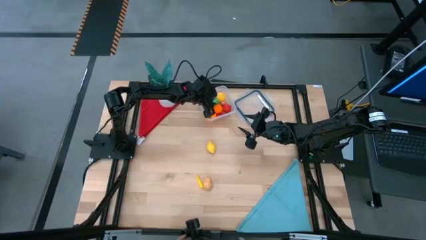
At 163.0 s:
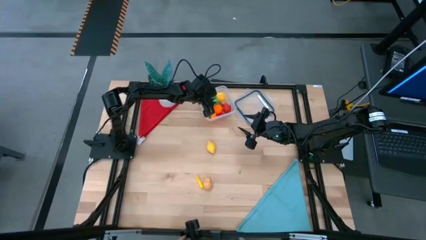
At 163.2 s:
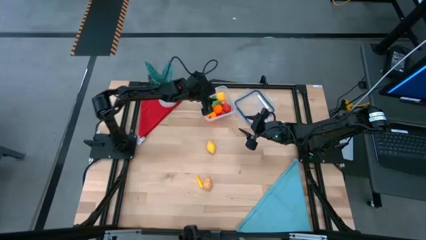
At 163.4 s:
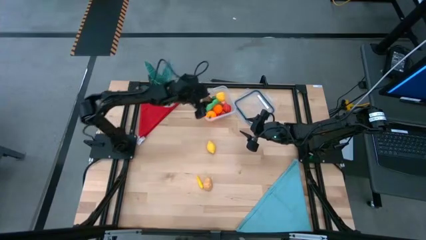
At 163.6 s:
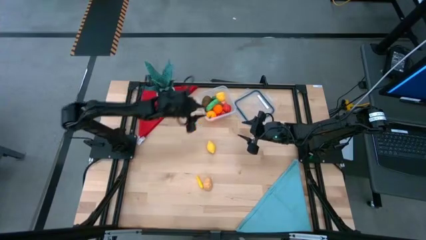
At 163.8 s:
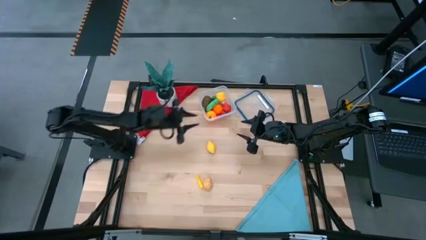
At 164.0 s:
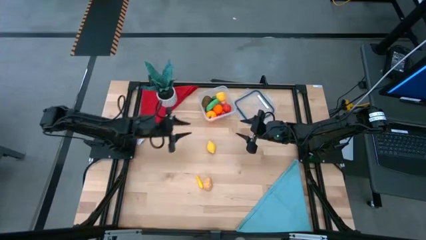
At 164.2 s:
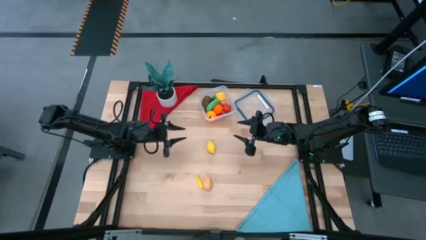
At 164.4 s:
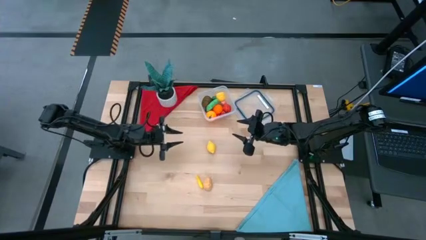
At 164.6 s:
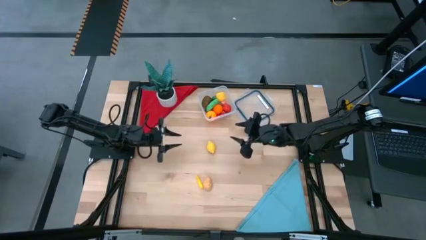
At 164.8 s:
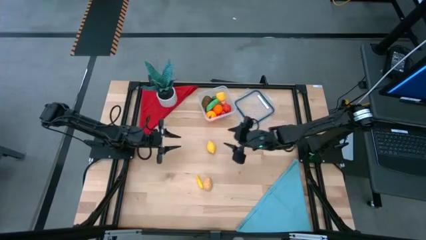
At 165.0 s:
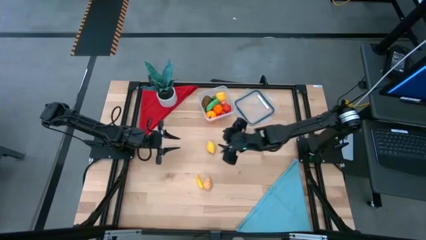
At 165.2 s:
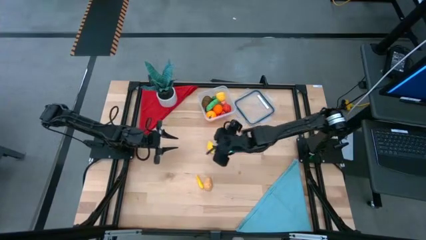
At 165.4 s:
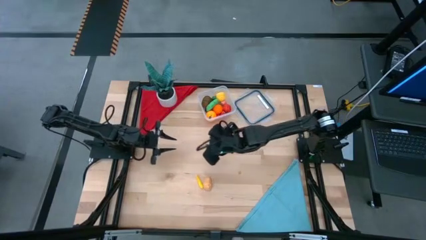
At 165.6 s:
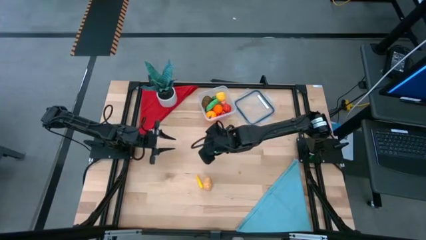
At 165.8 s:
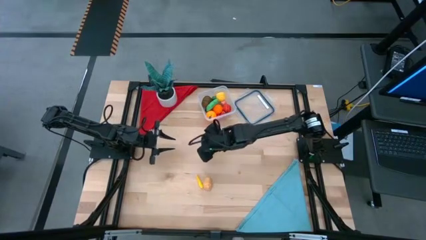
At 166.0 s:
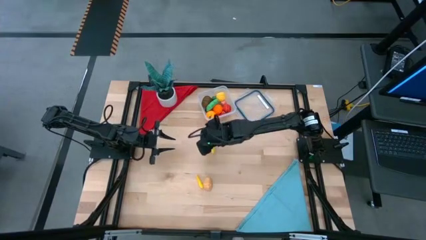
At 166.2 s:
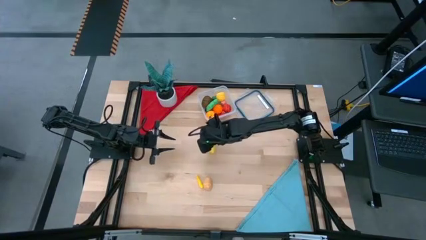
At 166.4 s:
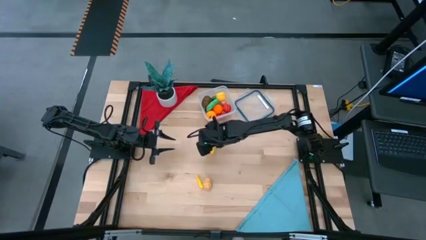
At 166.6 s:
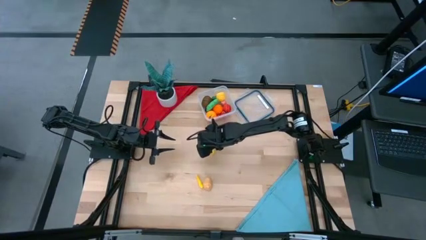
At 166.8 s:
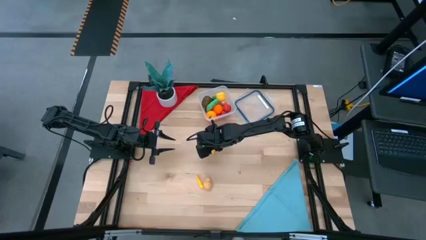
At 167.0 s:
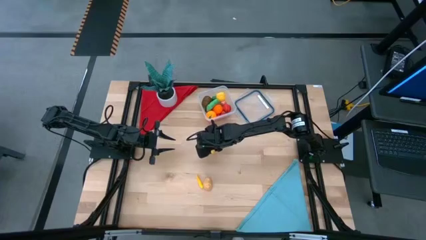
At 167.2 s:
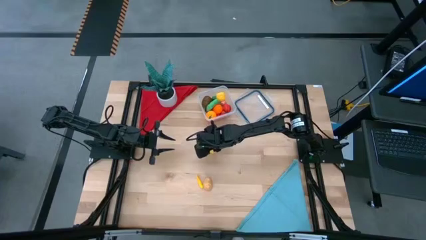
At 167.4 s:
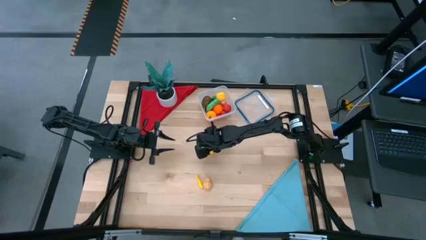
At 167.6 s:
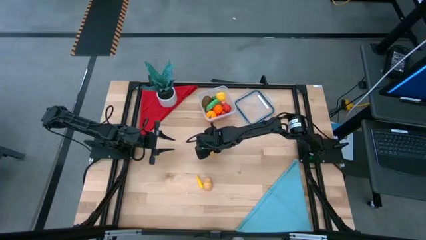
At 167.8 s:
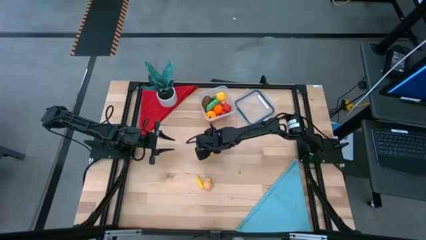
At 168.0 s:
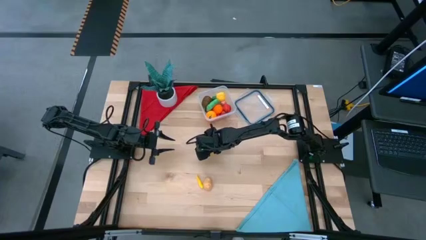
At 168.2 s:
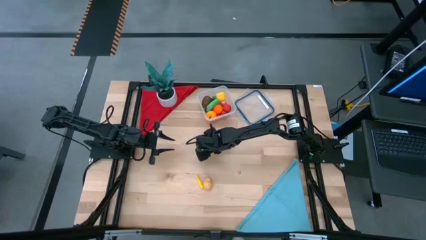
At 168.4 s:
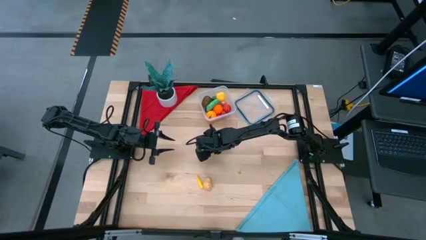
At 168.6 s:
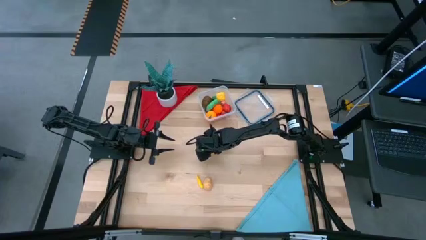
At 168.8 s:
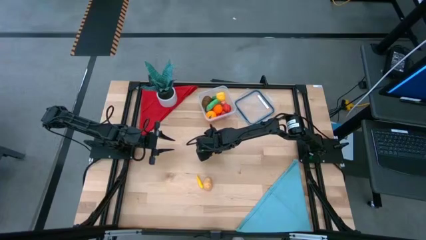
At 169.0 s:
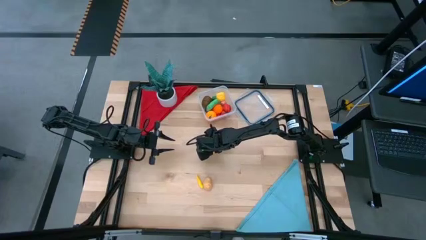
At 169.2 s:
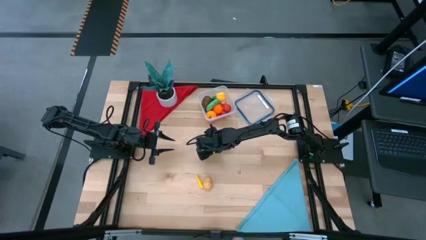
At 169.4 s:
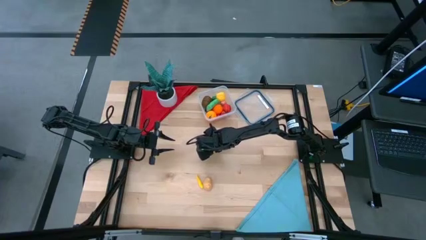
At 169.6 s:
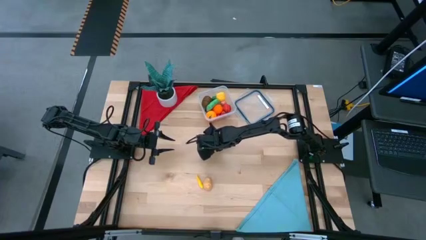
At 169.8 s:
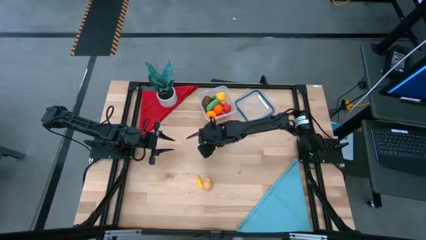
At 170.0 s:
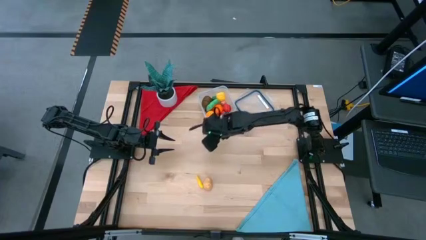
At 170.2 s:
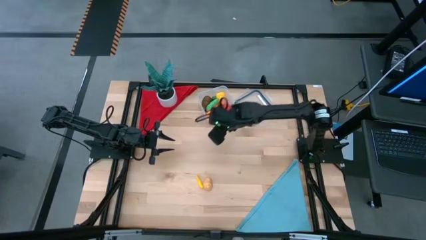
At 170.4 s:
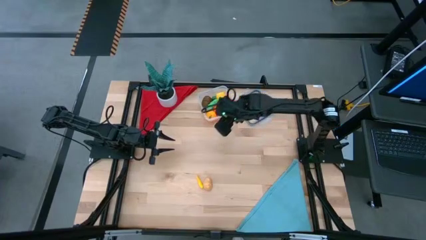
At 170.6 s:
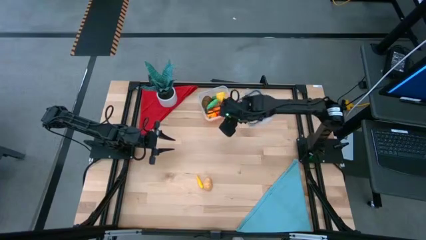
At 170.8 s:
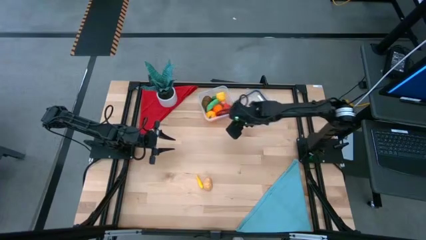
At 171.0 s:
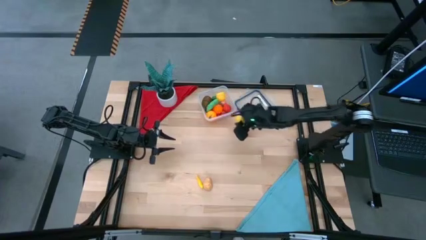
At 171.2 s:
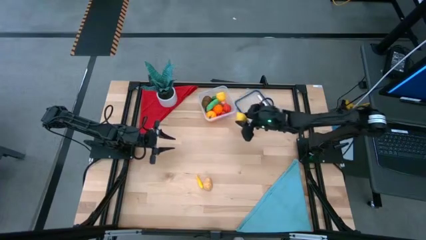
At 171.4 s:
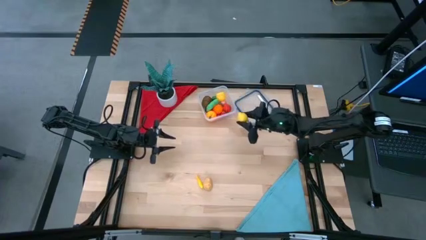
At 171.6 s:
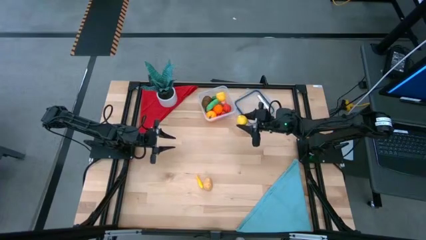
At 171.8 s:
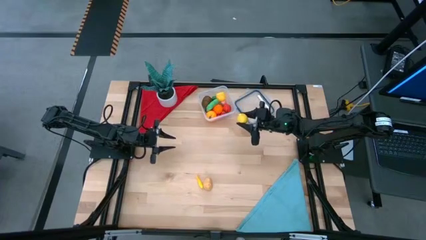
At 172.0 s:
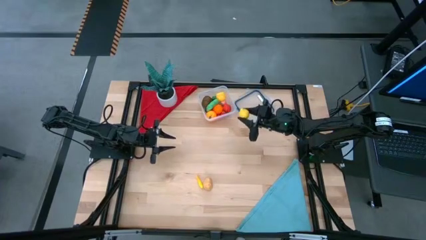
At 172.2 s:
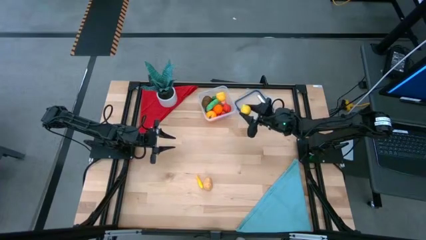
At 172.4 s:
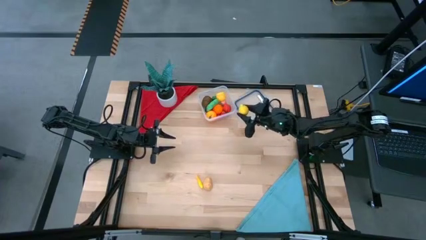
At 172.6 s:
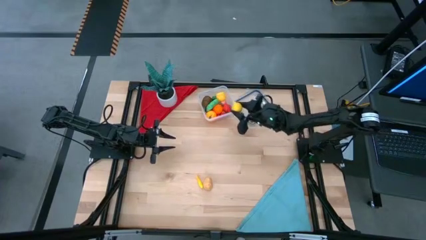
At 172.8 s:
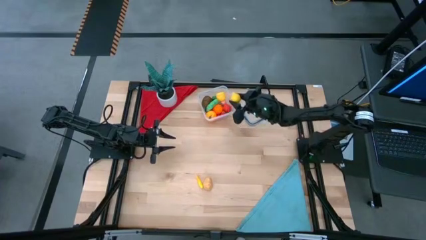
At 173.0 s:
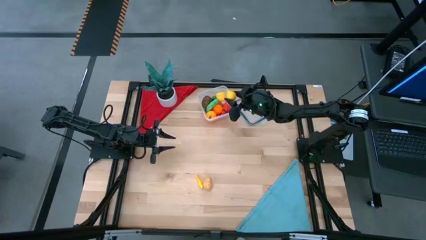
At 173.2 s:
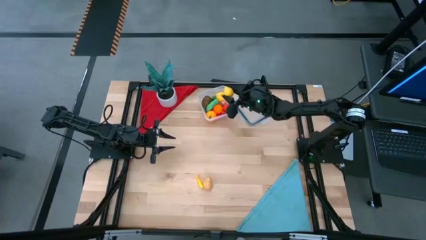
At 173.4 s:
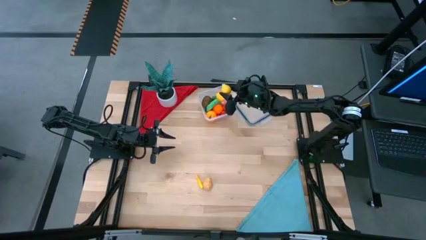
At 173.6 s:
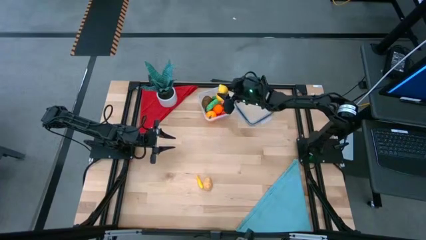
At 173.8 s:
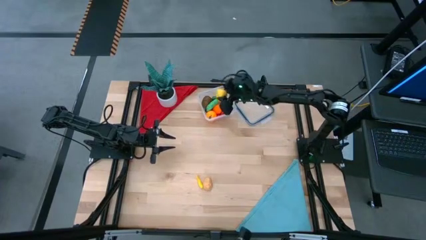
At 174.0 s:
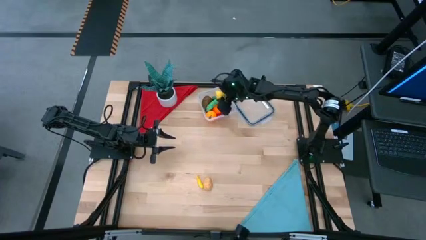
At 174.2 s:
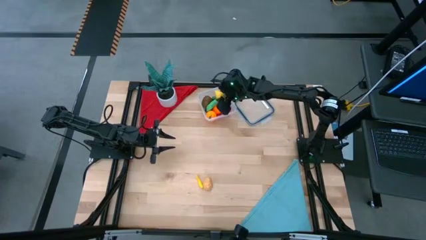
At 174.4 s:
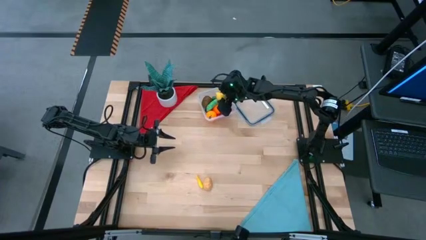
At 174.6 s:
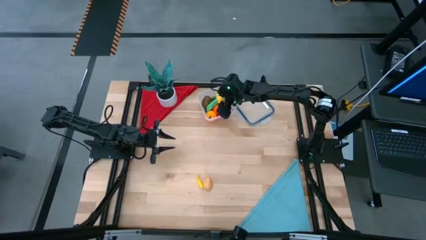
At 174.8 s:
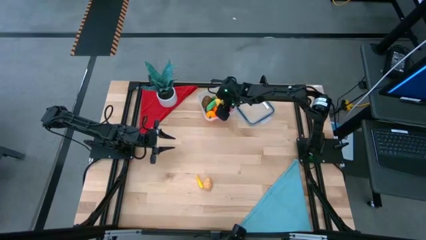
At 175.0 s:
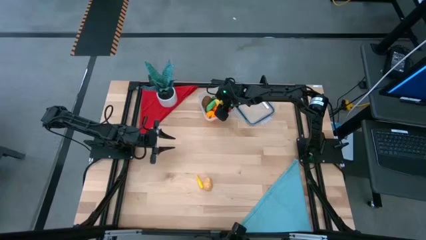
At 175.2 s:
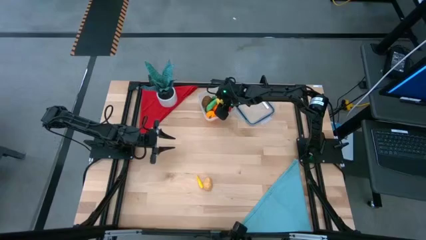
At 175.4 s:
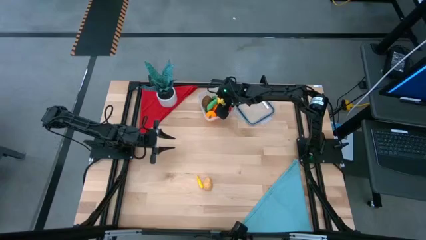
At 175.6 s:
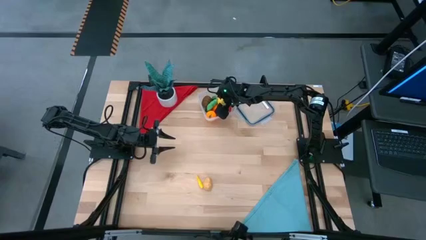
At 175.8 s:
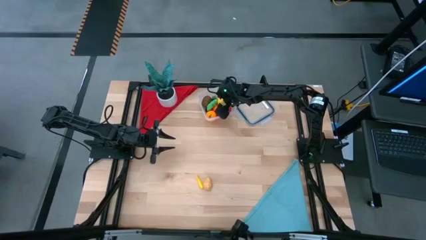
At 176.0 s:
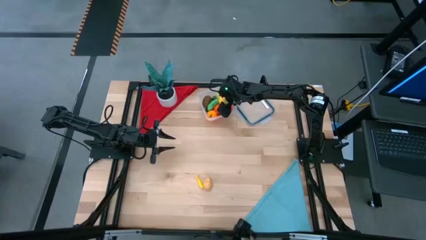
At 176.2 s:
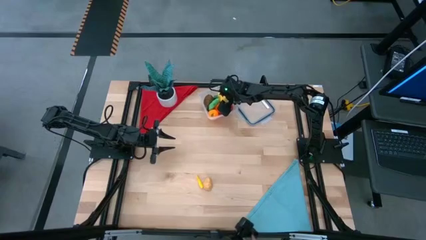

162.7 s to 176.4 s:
Task: Pick and placing Produce into tupperware
Put the yellow lemon into the transparent container

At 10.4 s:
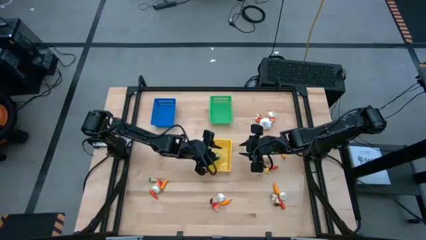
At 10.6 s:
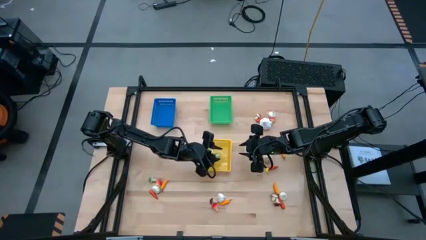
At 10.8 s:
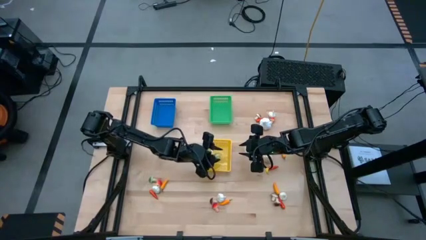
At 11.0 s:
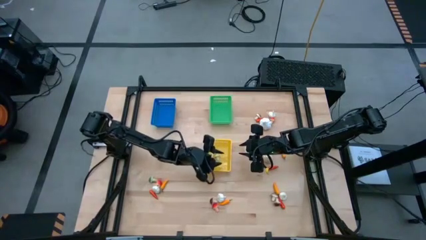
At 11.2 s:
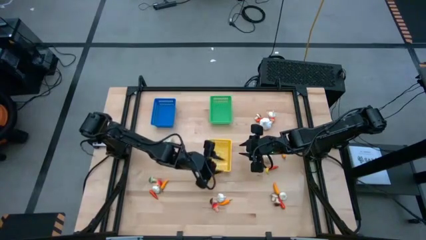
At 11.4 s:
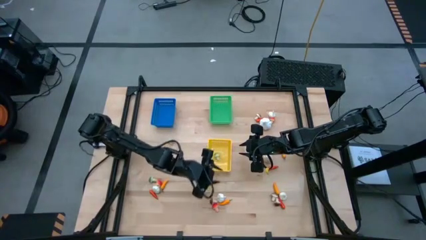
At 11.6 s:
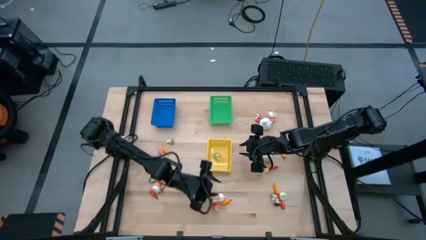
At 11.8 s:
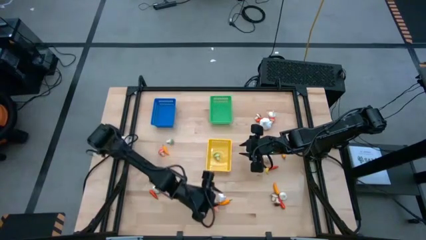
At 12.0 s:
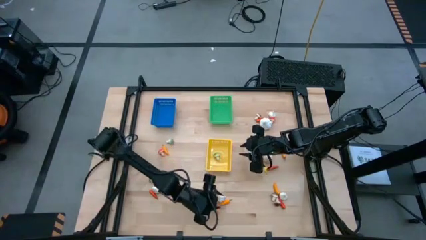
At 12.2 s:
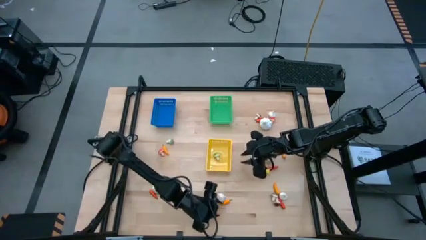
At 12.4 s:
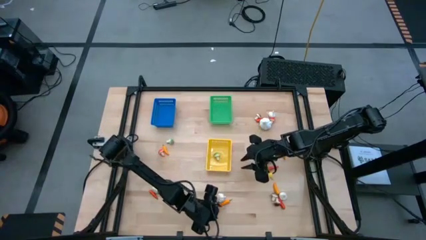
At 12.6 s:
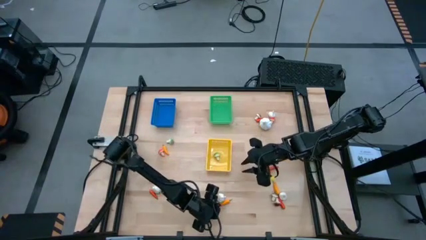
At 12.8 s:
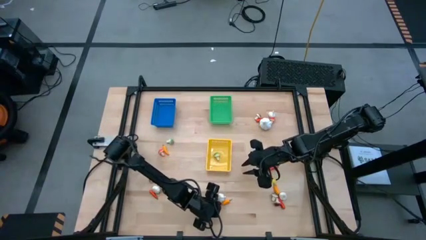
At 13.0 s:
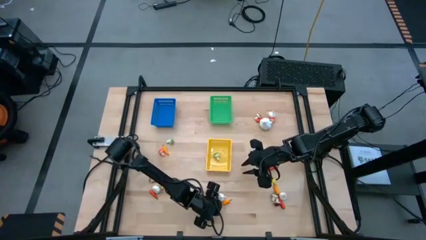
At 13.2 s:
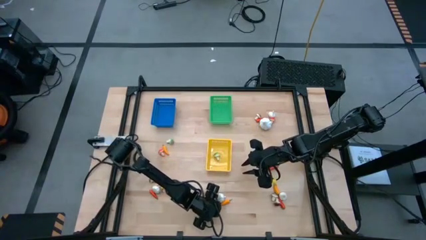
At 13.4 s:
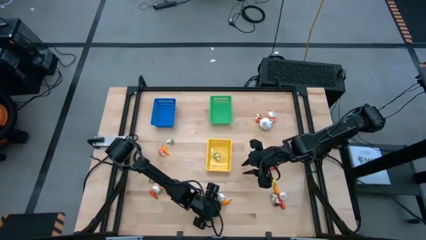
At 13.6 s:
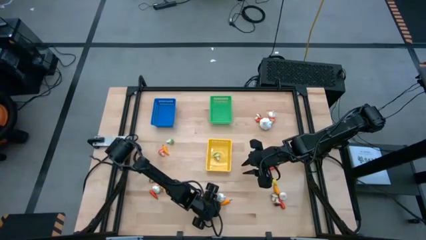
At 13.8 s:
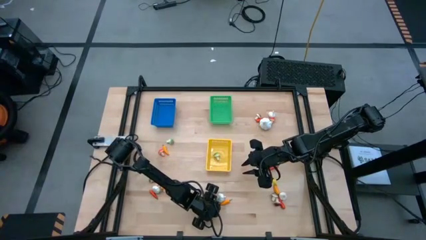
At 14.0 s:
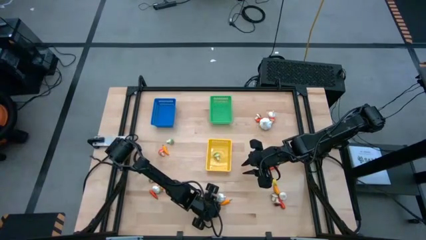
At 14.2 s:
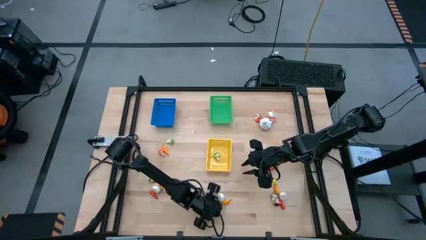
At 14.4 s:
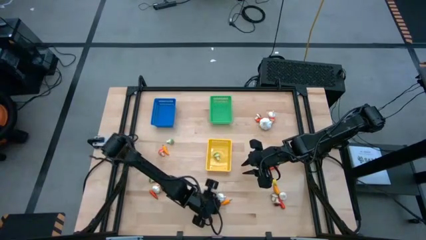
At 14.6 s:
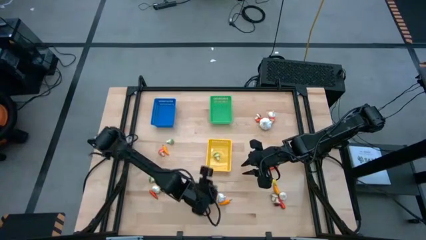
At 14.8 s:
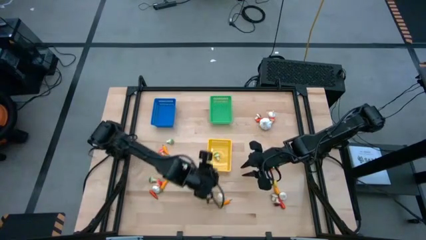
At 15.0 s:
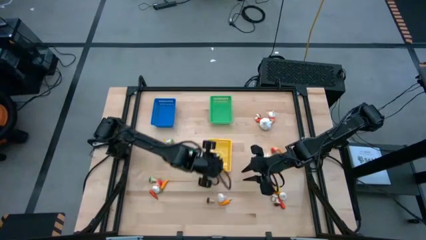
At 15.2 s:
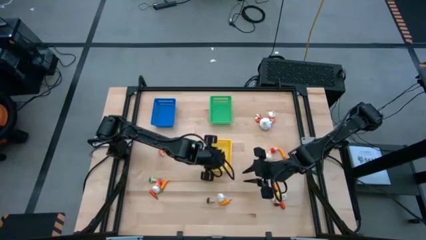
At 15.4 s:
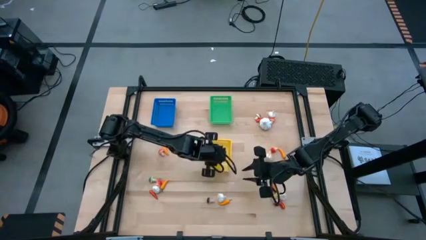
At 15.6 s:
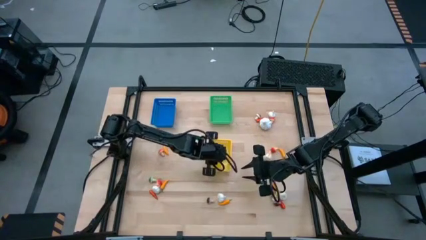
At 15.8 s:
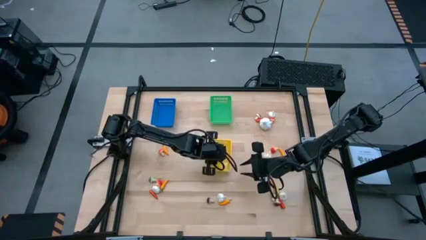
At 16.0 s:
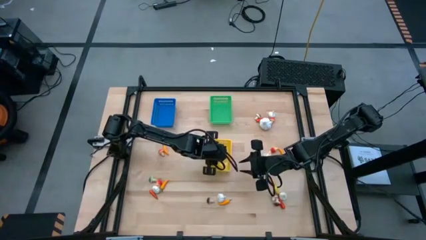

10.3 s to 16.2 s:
Task: Sort produce into baskets
Put the red mushroom into the yellow bin
